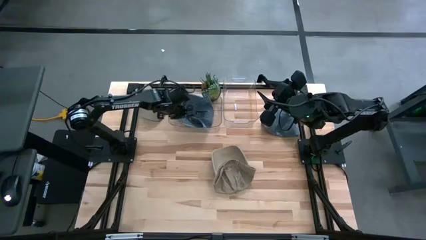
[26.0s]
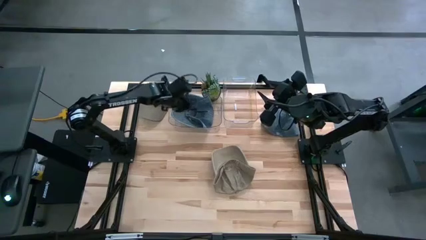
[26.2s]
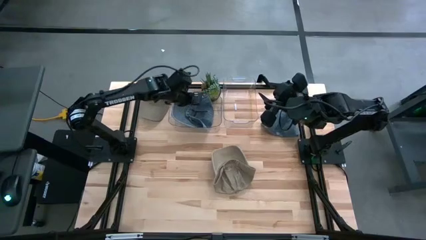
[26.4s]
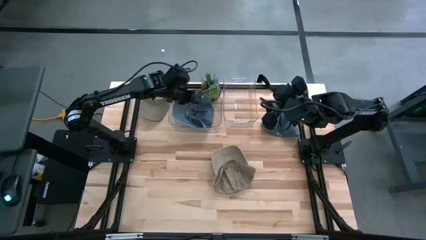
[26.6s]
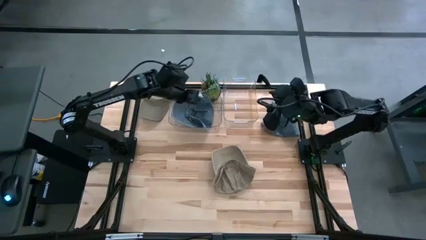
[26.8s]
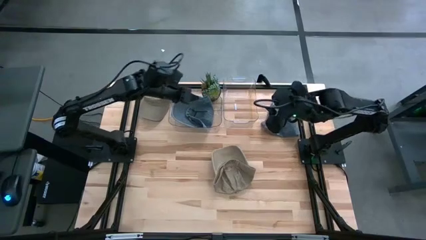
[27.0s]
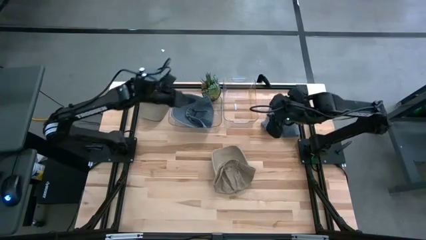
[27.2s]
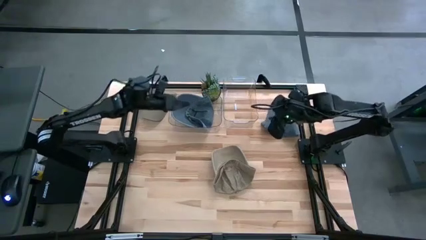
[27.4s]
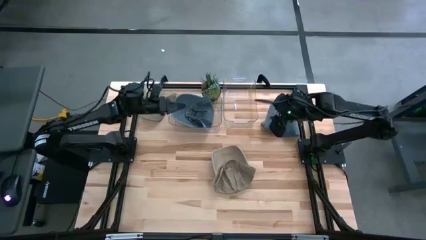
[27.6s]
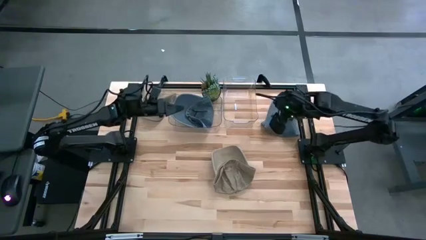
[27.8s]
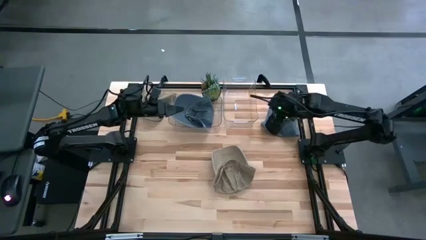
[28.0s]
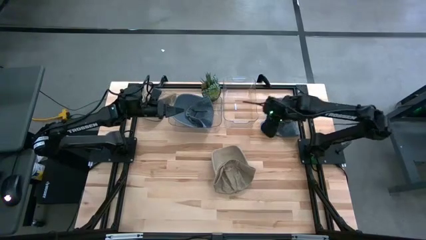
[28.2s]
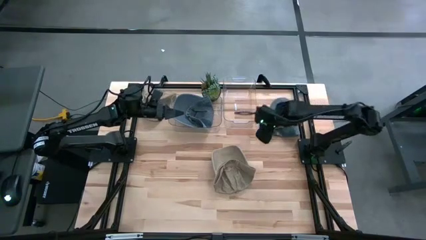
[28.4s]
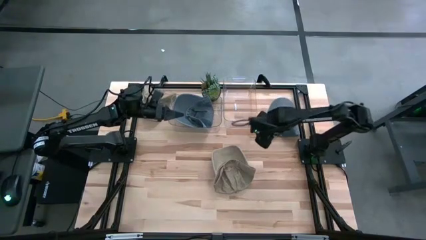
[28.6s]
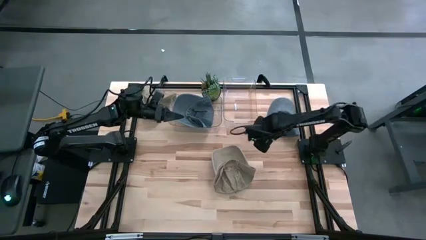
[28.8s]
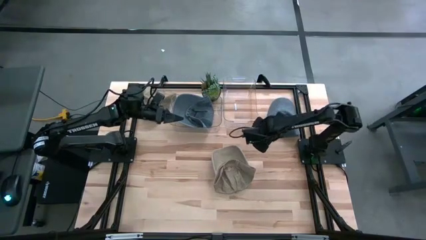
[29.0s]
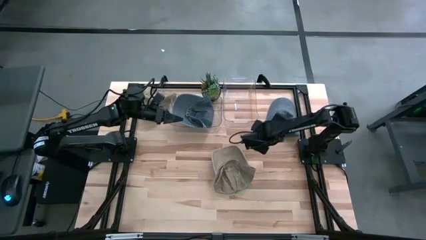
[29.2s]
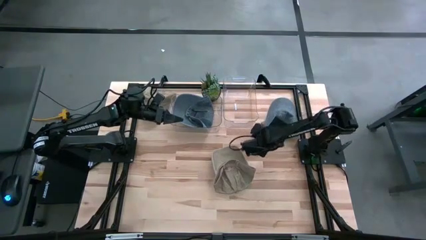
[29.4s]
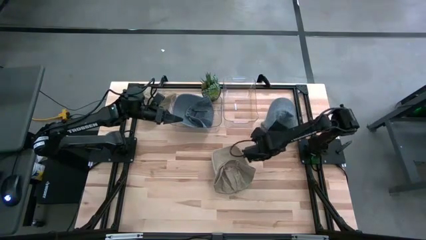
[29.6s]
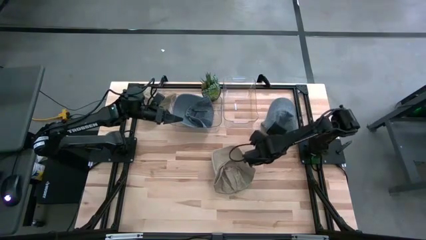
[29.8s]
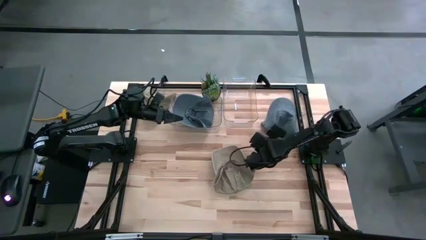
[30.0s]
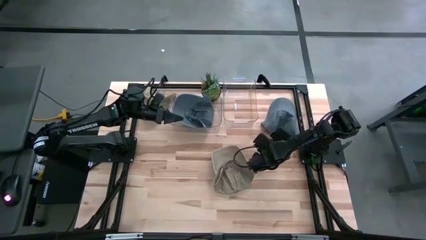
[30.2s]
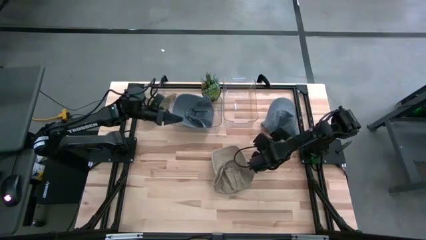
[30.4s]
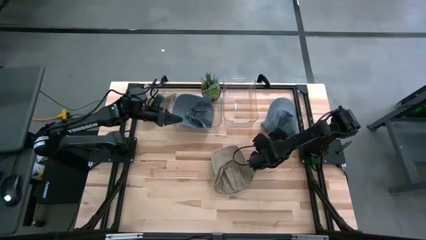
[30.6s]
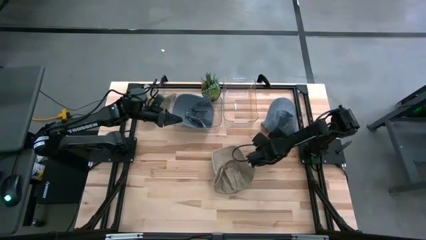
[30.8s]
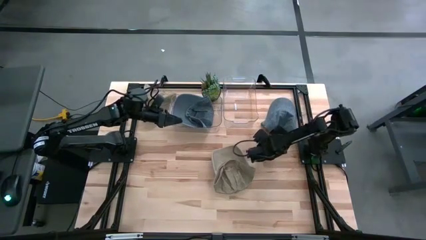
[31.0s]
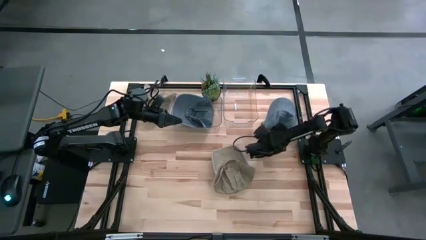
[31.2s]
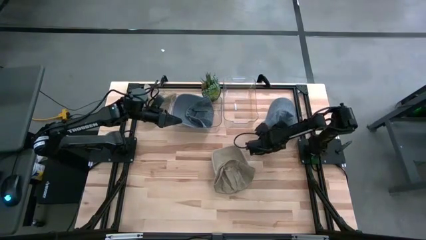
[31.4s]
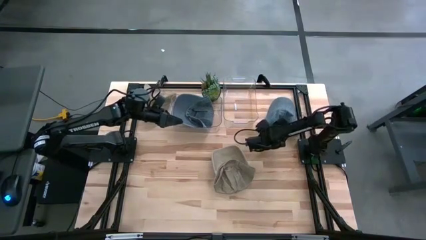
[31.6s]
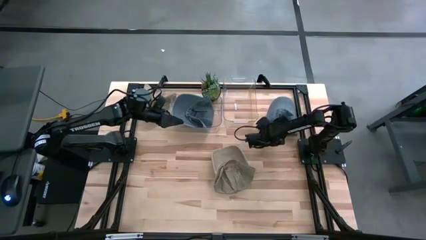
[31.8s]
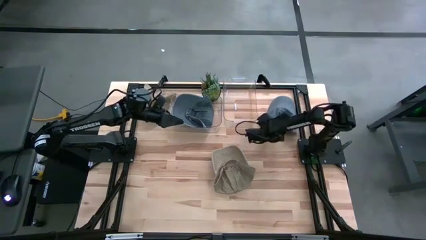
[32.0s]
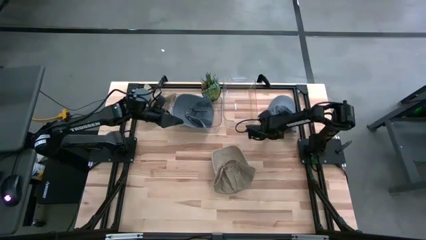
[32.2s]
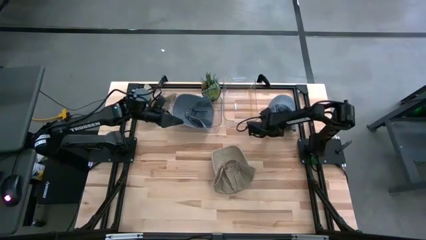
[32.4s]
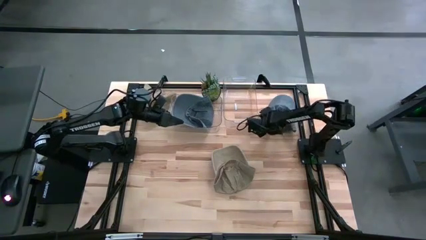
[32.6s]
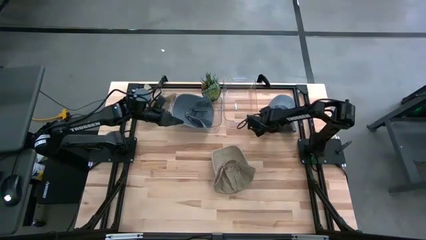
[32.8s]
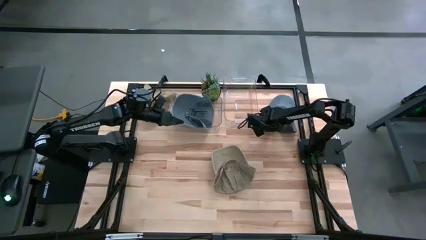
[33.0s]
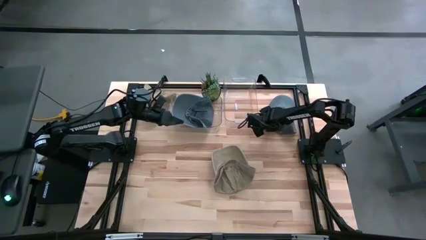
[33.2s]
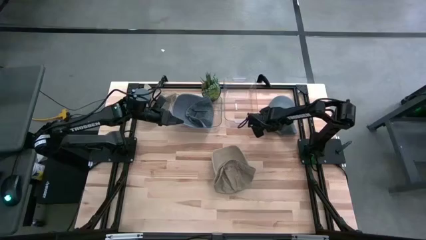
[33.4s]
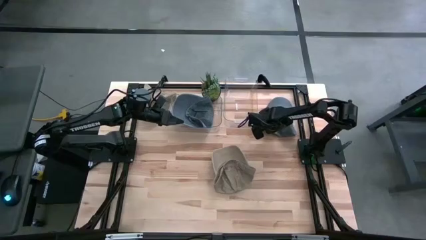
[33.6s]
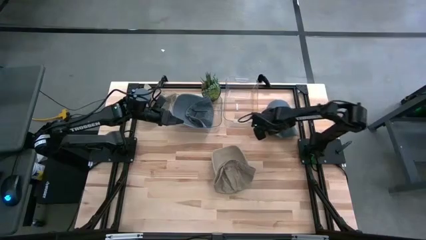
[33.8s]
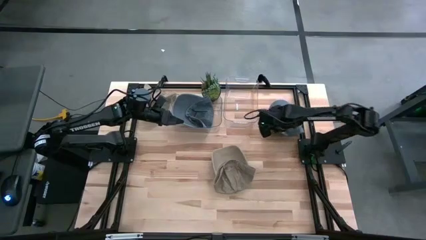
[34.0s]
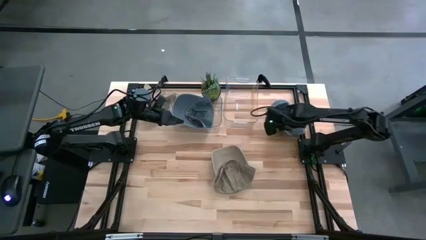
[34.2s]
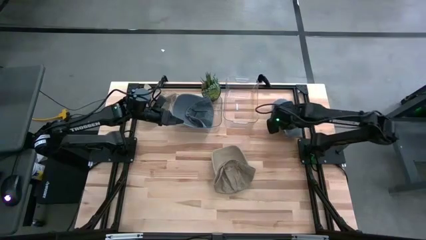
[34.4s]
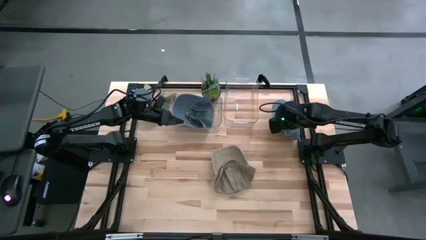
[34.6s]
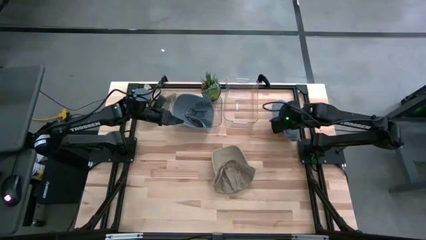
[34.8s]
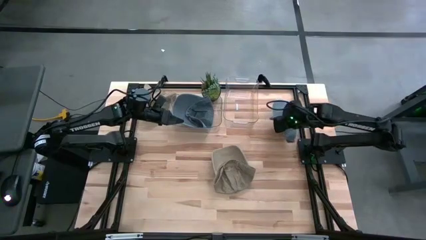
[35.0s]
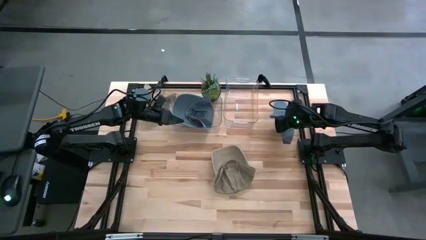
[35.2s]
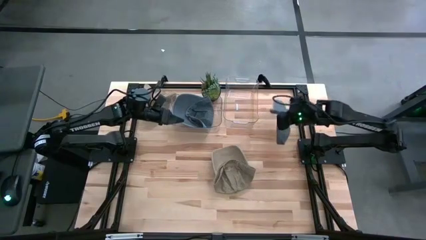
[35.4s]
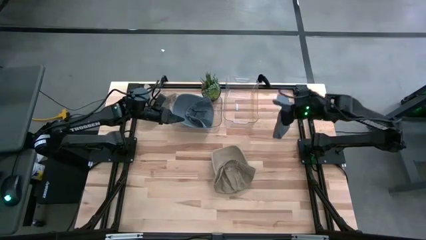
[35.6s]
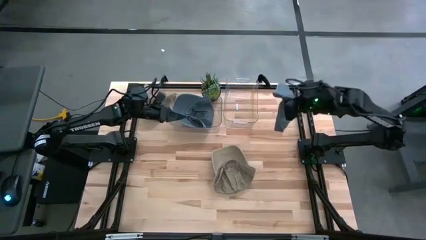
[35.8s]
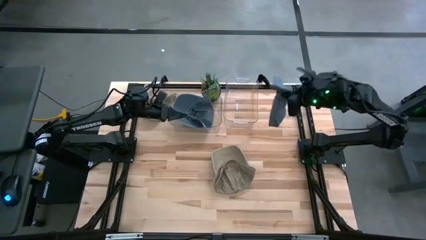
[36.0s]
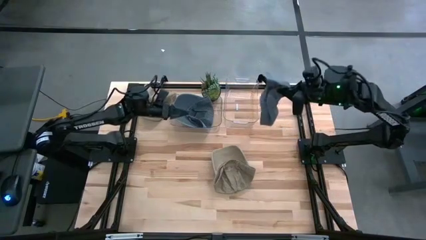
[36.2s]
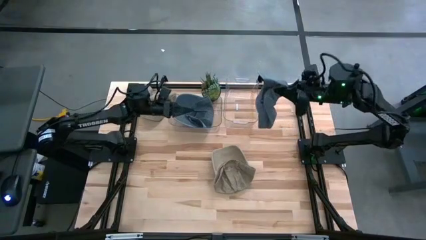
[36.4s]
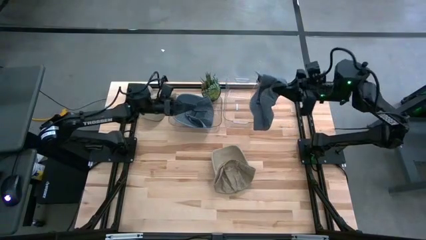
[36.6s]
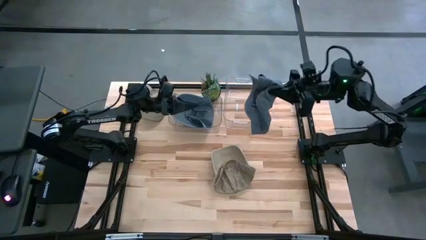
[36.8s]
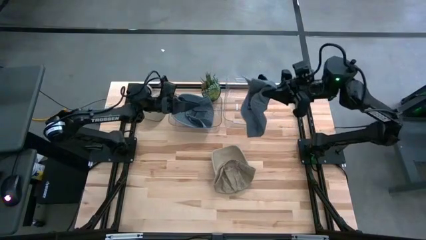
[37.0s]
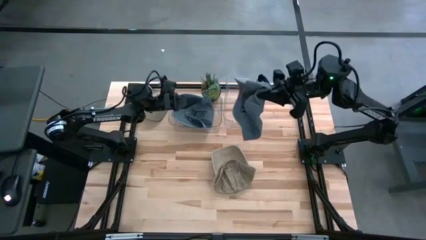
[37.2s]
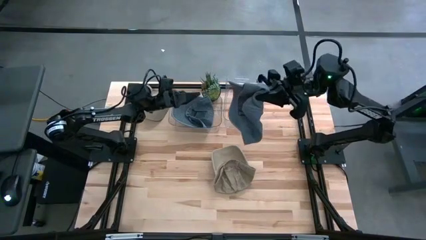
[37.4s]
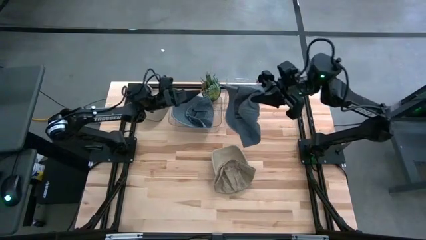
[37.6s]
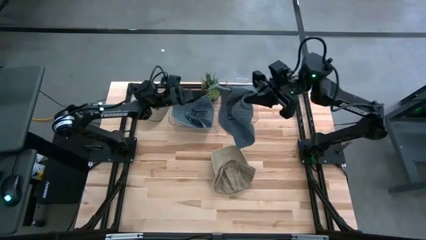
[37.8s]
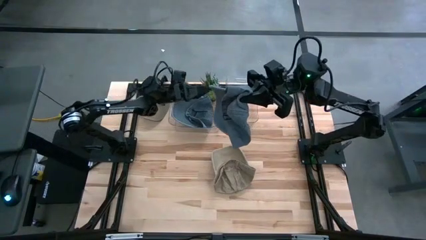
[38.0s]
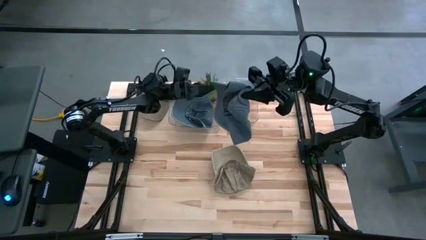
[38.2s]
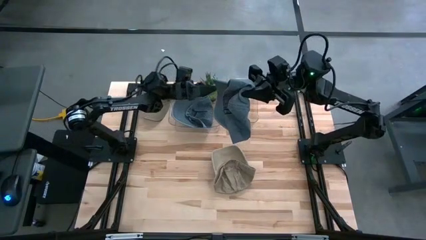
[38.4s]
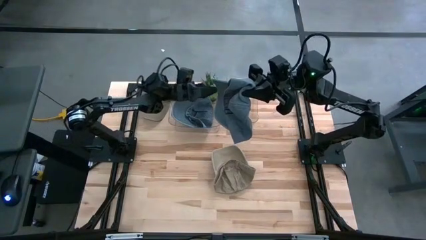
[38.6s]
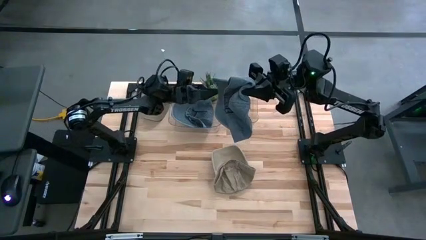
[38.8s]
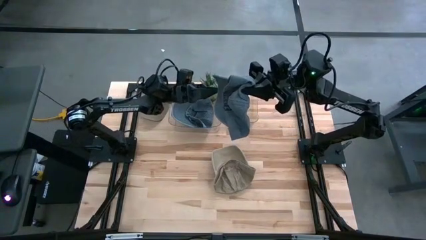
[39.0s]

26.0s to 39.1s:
Task: Pick & Place hat
Put the gray cap into the left transparent bin

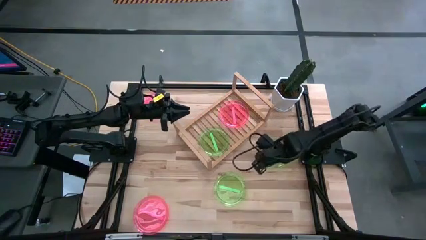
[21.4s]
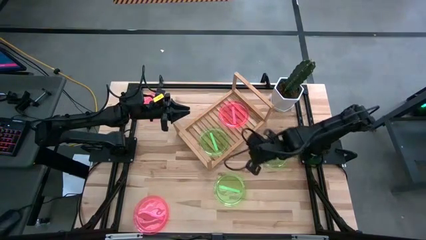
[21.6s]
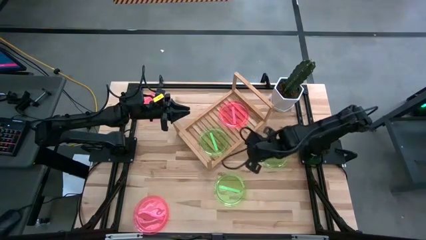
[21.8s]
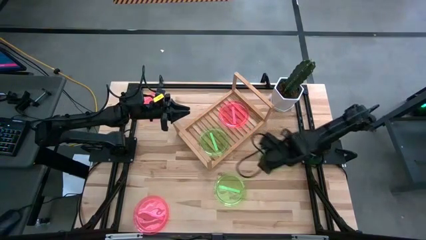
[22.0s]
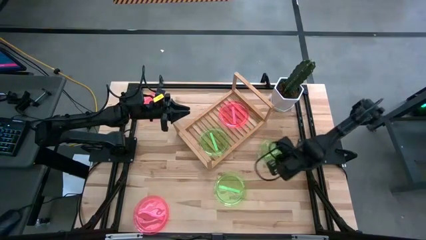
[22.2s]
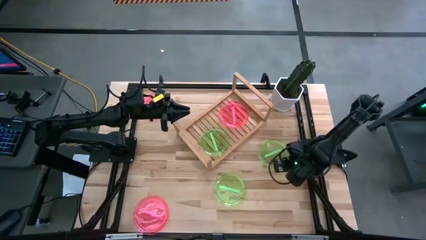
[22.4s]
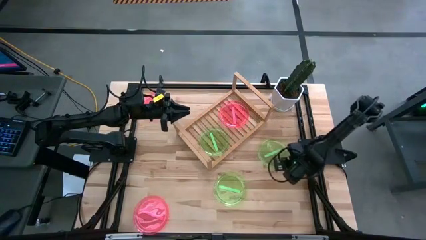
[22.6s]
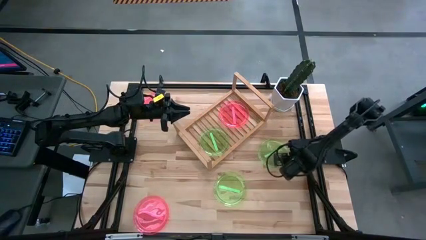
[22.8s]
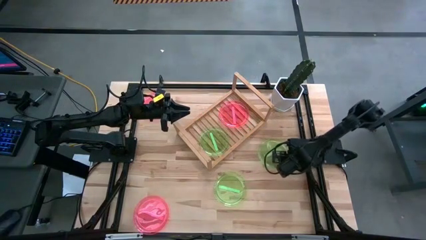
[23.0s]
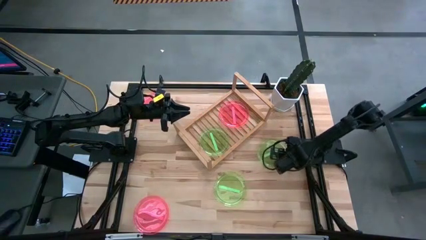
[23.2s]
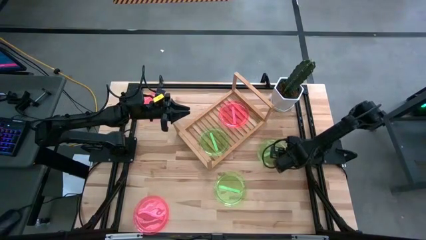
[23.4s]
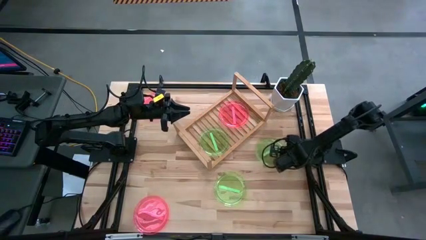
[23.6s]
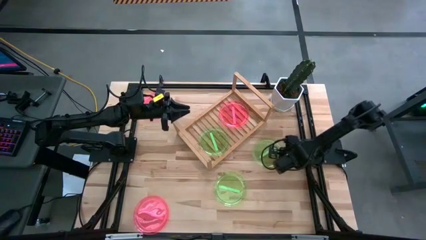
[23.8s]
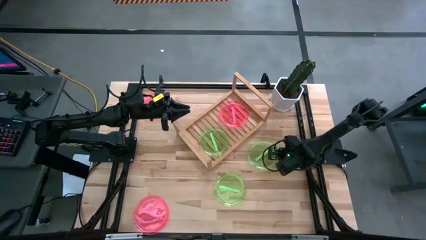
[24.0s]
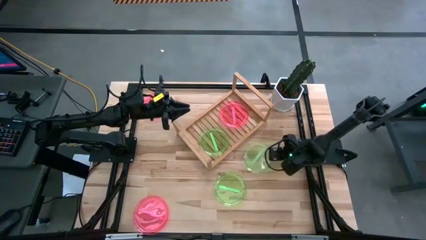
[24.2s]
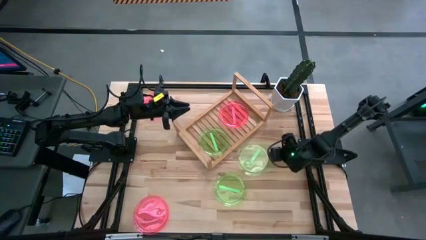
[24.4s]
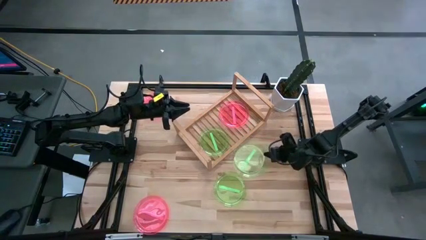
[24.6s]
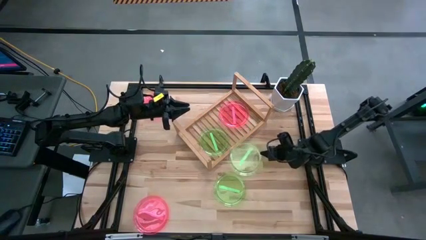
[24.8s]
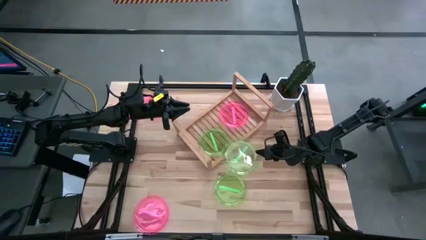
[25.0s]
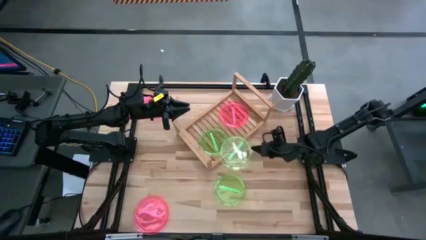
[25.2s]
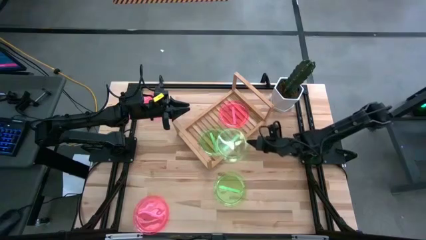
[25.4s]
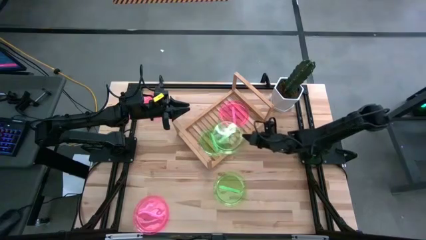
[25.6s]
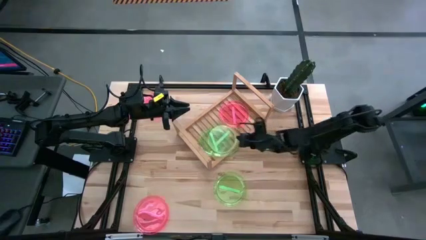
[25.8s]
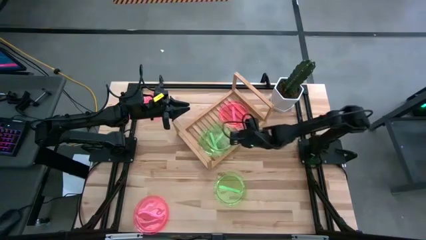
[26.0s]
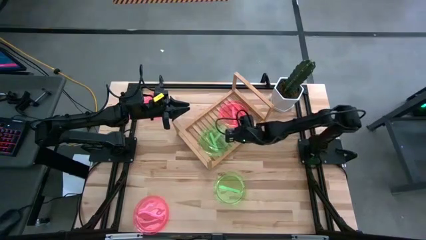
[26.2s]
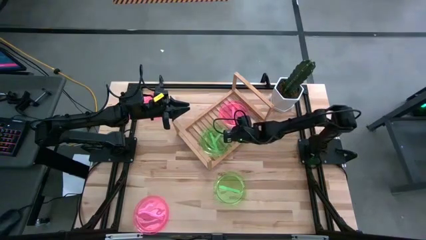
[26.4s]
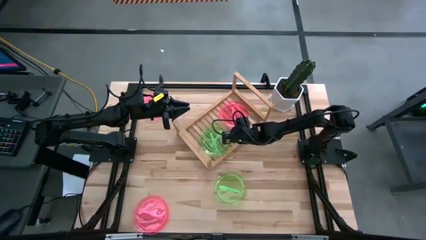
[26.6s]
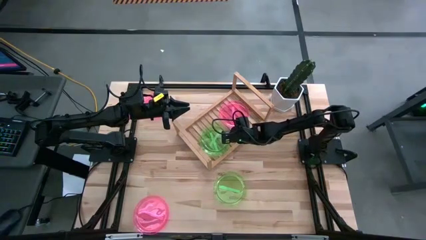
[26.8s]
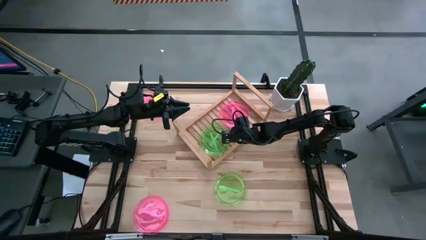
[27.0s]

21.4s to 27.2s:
Task: Place and stack plates onto a shelf
Stack the top green plate on top of the other green plate on the shelf
